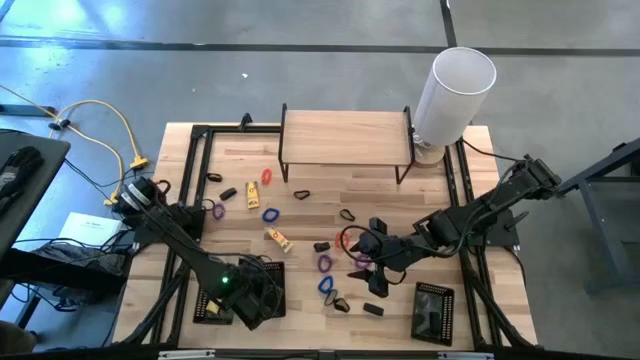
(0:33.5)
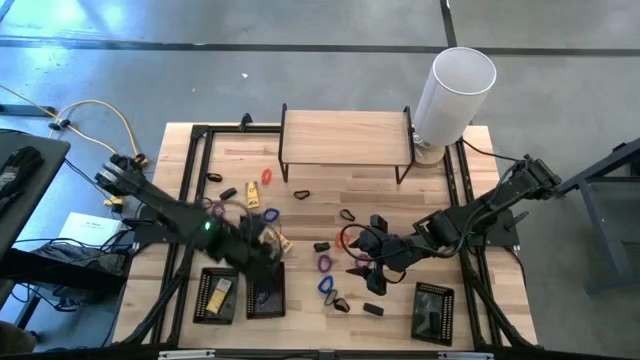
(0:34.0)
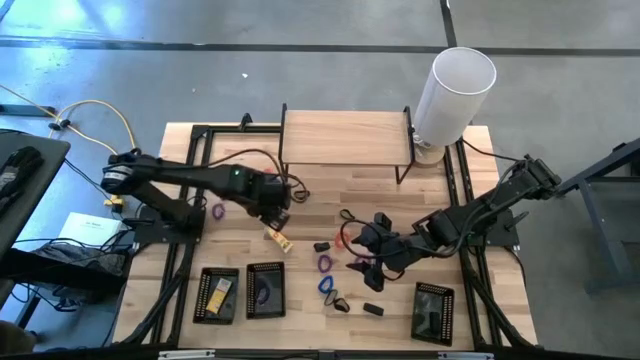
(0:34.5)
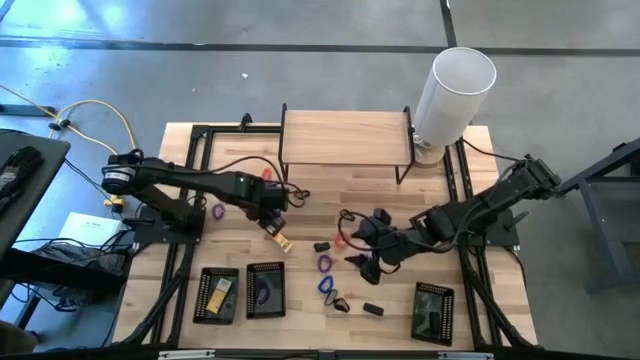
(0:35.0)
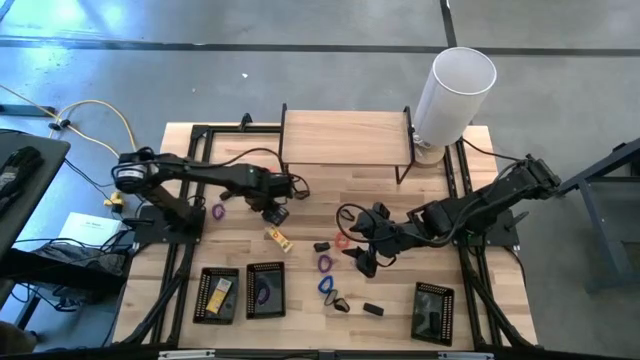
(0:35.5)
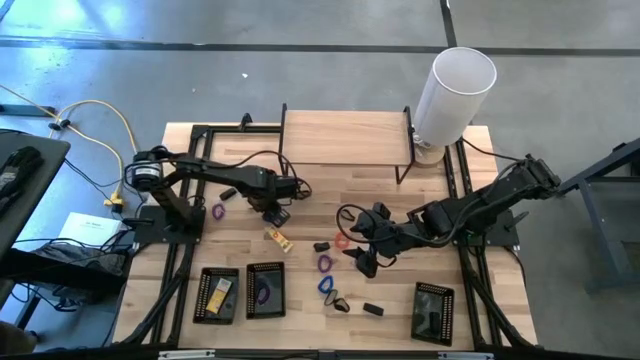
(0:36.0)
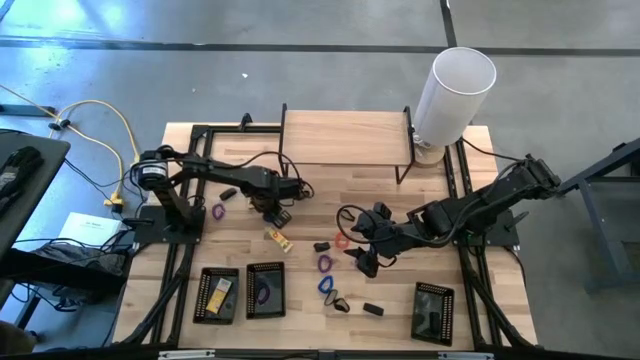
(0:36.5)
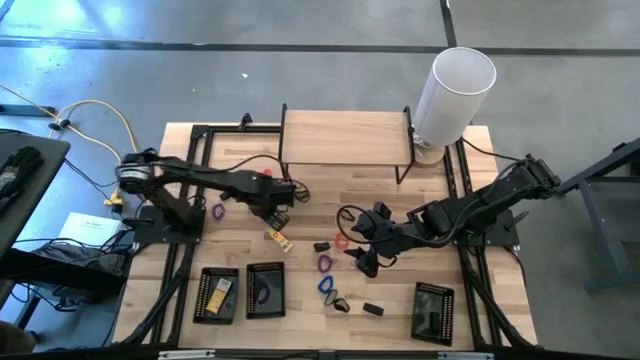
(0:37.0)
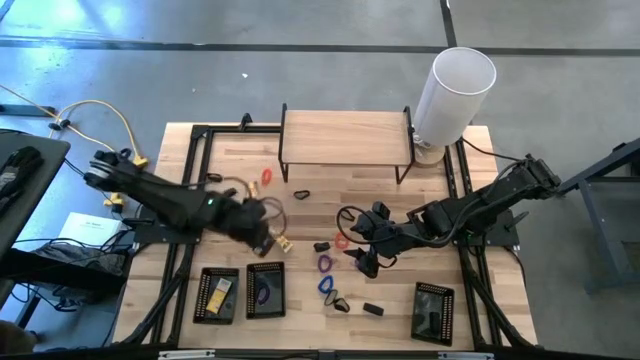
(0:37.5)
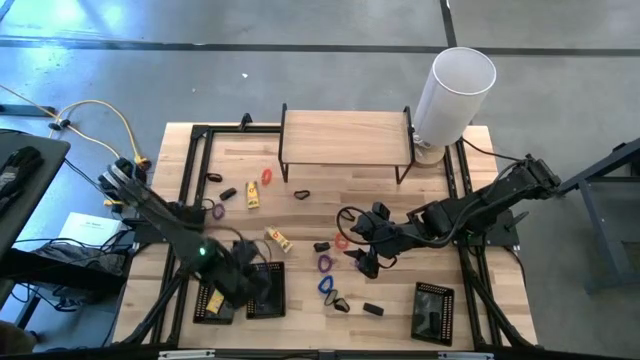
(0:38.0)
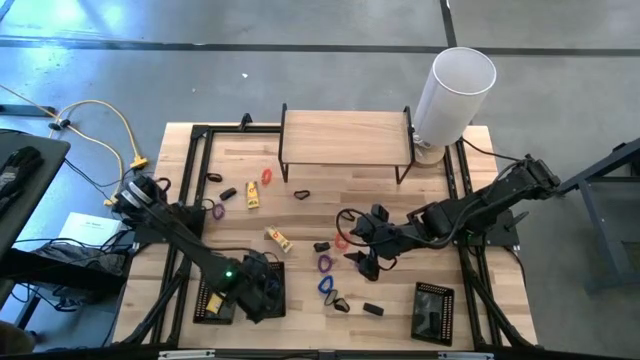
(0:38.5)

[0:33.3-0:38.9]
Task: Pick & Place Office Desk Supplies
Put the blue spring key chain into the middle black basket

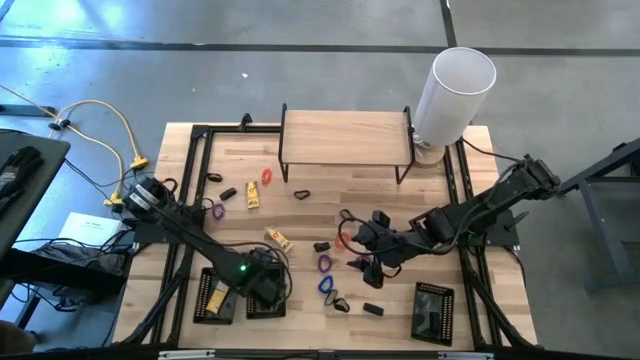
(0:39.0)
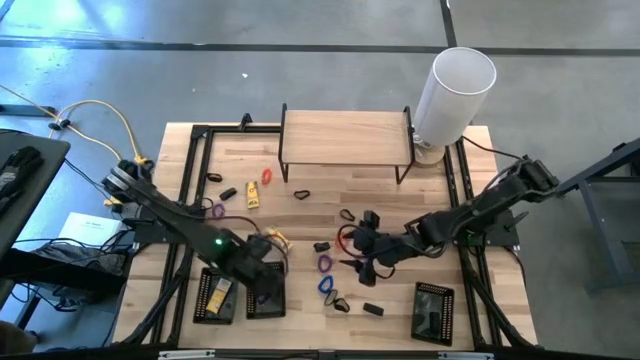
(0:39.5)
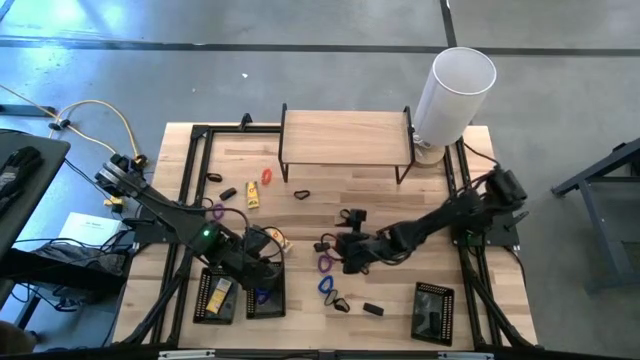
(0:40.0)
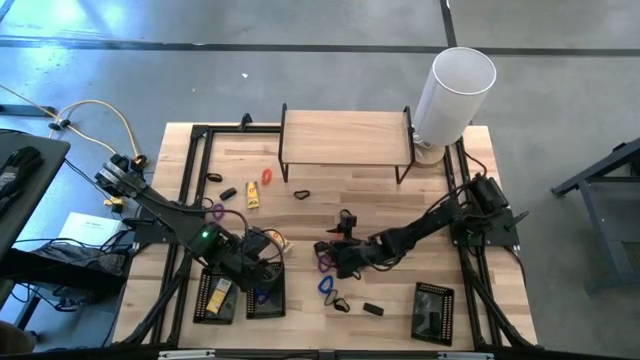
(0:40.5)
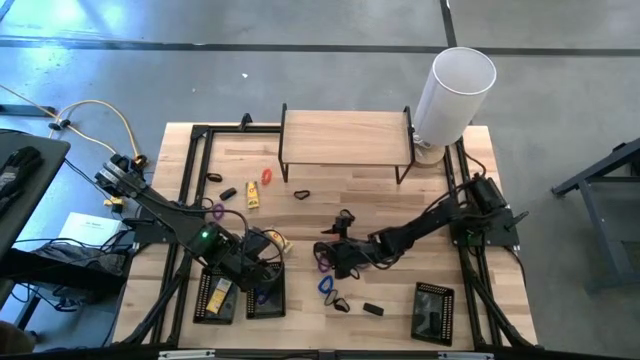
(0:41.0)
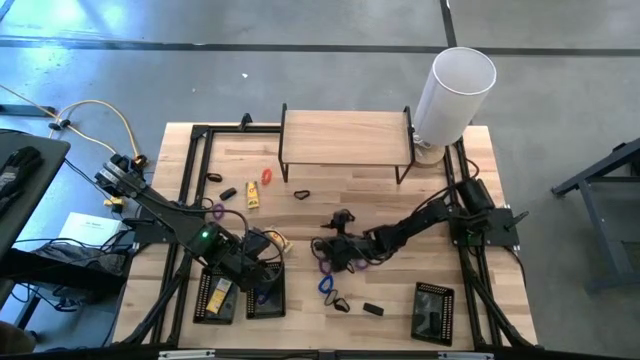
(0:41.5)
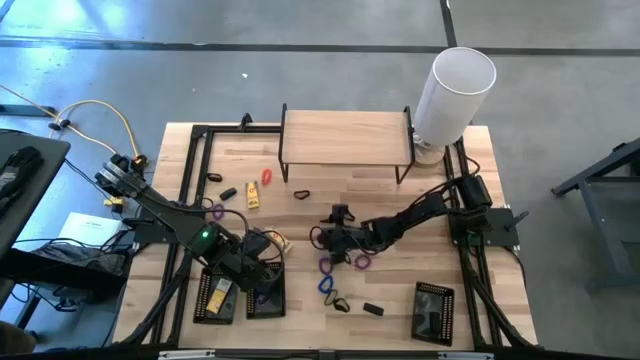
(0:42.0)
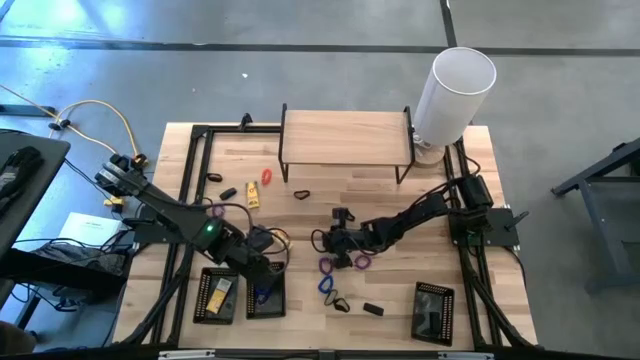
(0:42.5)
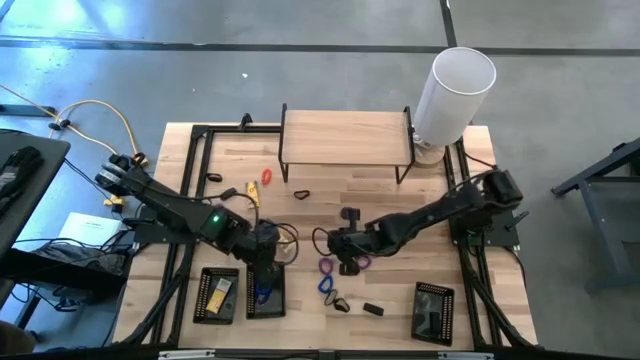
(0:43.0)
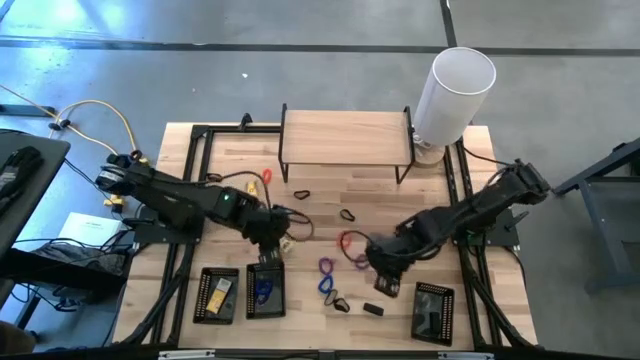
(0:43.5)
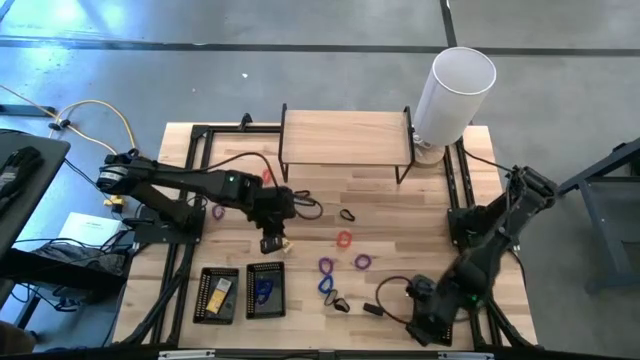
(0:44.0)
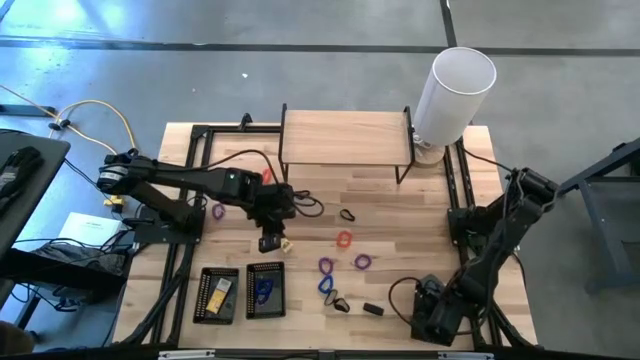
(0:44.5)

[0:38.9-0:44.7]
Put the black rubber band into the right black basket

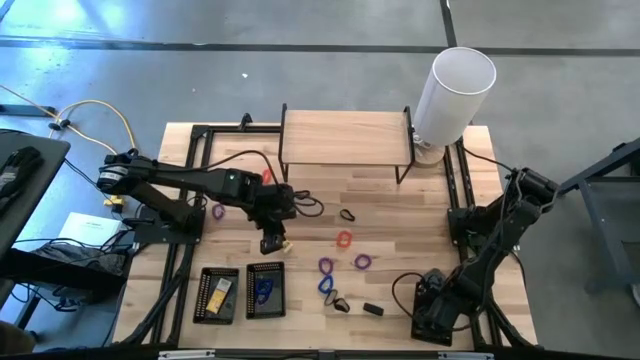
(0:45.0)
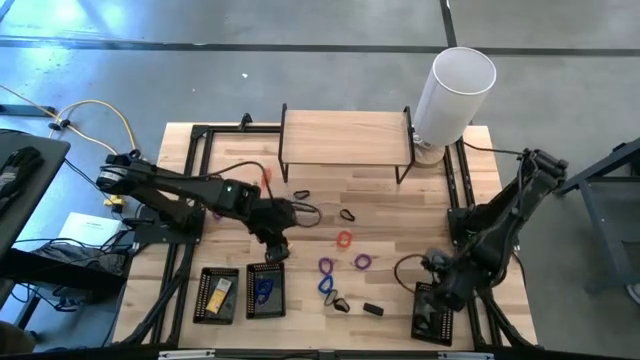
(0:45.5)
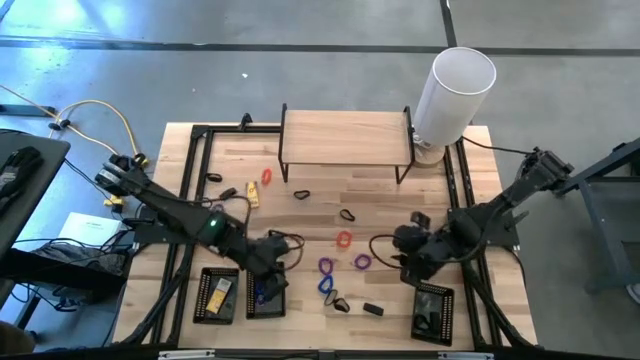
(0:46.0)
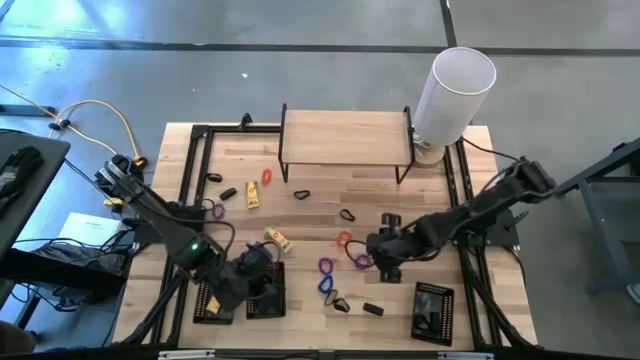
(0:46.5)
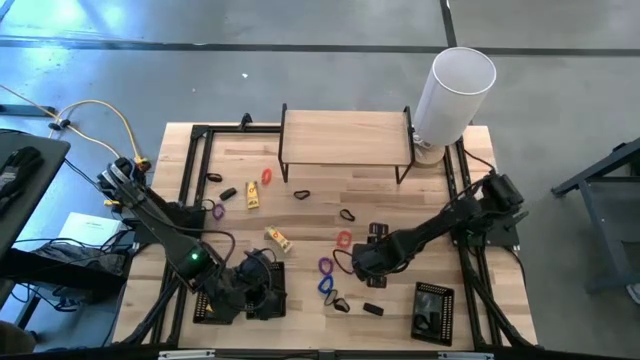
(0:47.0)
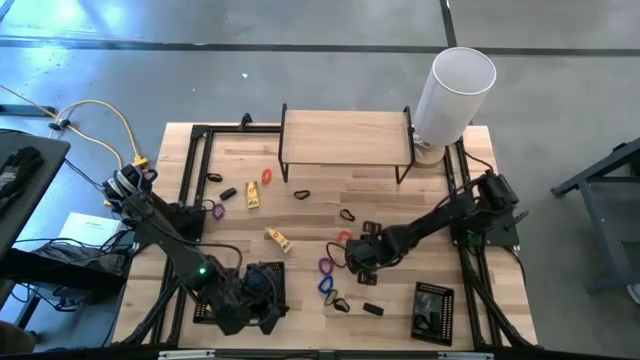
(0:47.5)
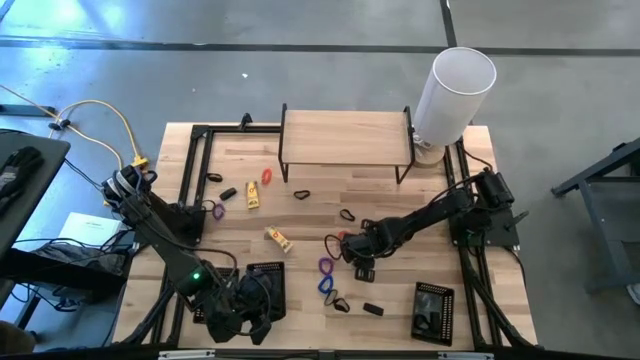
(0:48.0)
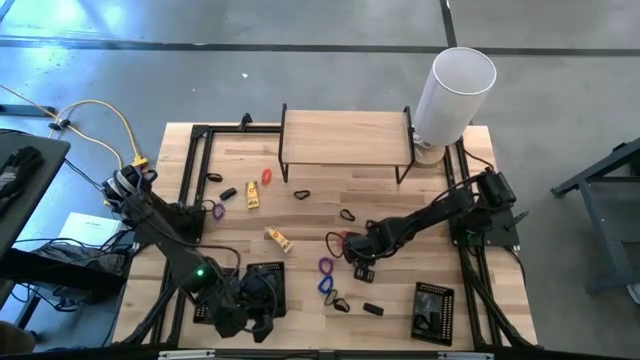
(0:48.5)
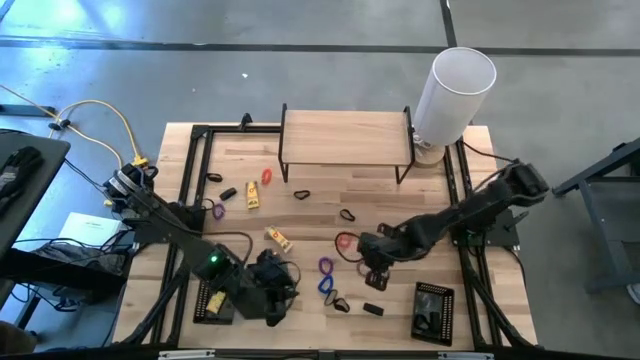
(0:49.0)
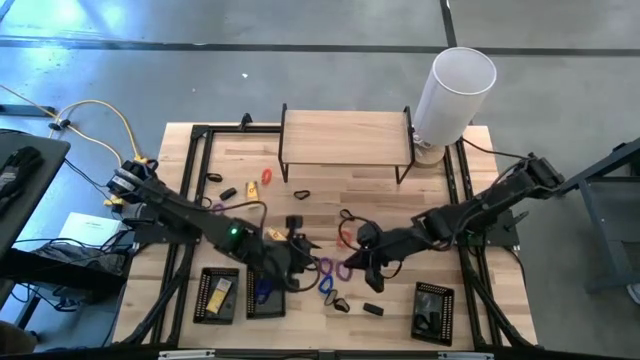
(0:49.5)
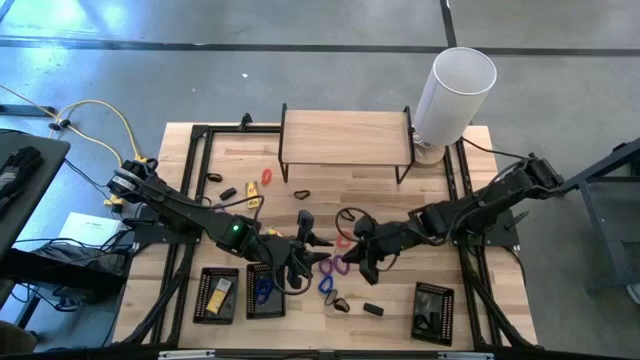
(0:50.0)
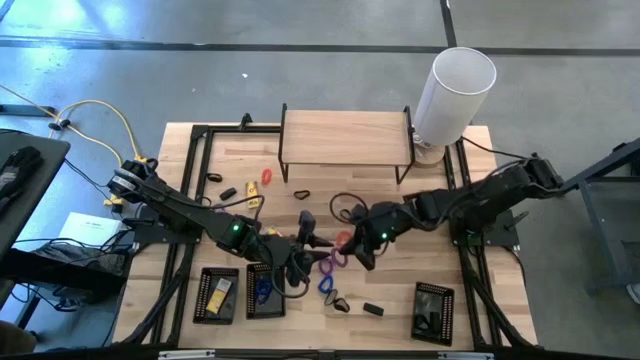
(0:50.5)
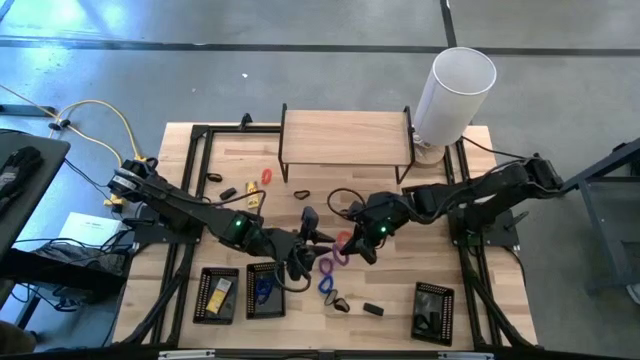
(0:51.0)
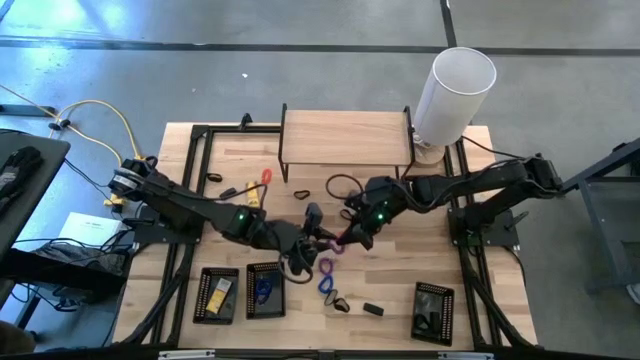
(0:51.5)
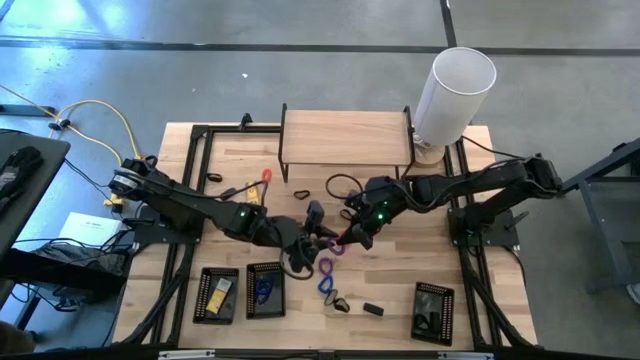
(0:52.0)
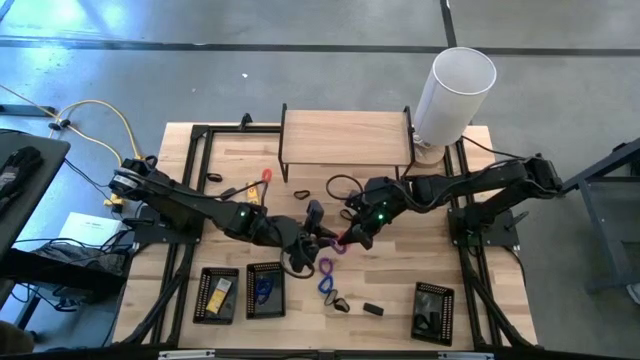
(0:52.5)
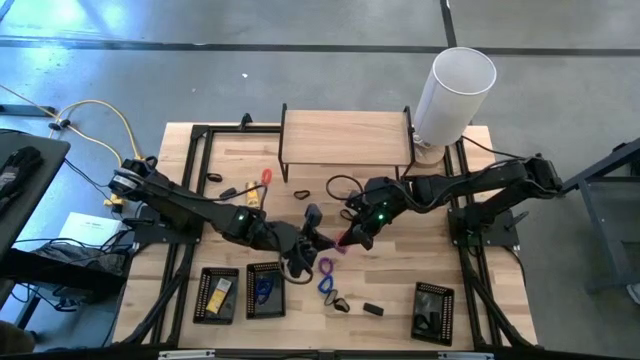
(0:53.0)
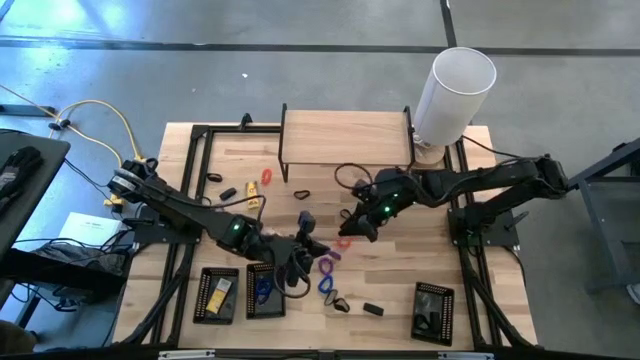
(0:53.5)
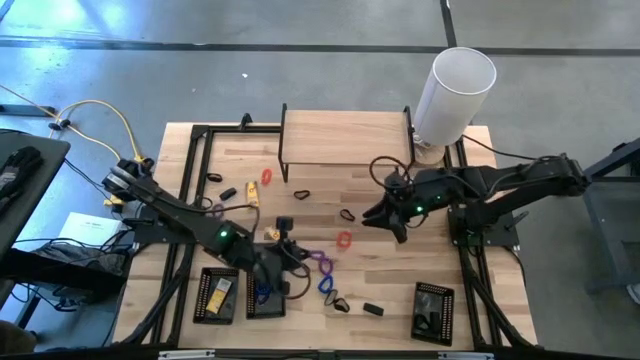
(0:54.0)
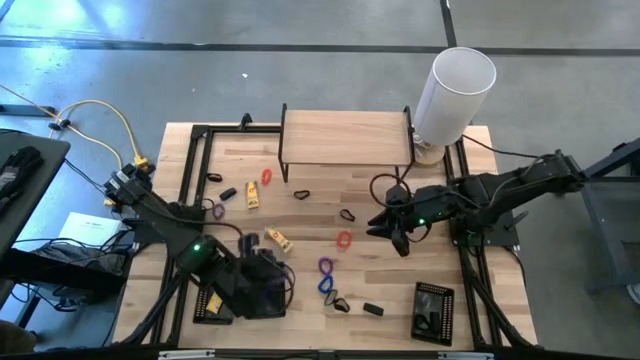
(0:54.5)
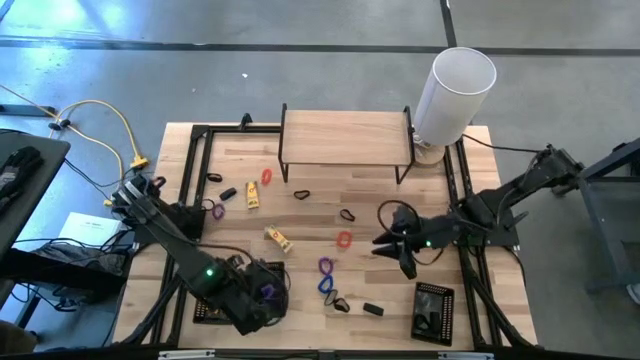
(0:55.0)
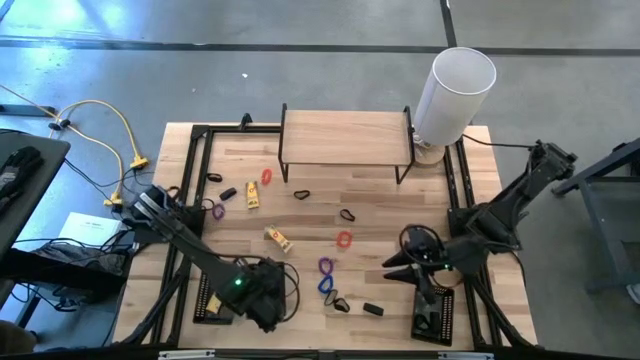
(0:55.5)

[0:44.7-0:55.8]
Put the violet spring key chain into the middle black basket
